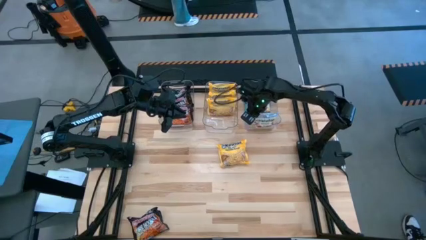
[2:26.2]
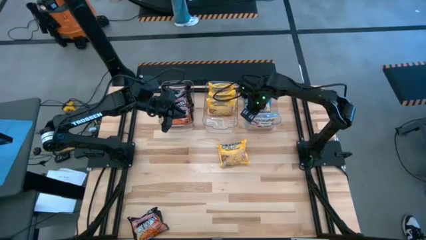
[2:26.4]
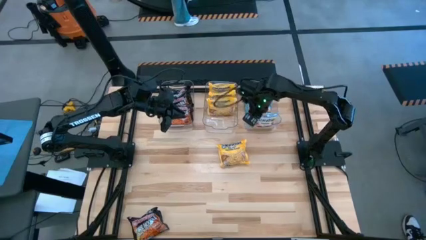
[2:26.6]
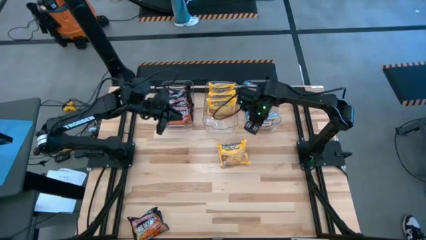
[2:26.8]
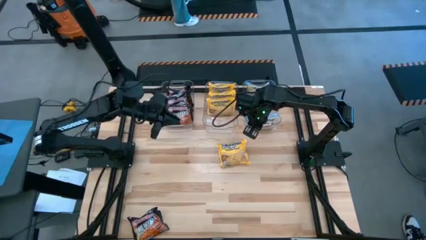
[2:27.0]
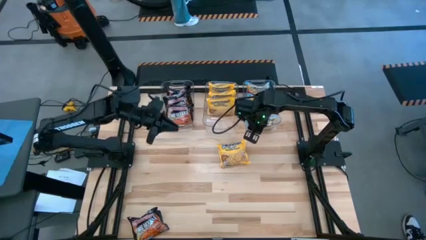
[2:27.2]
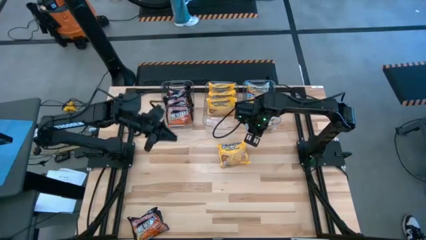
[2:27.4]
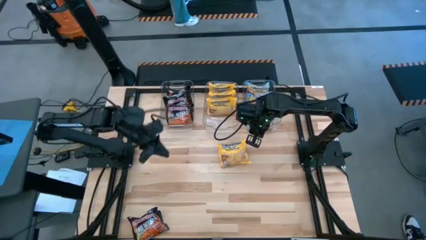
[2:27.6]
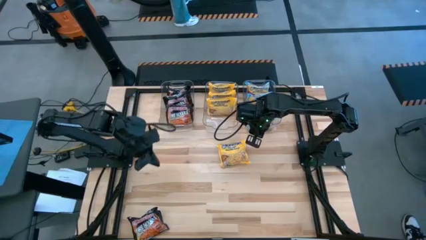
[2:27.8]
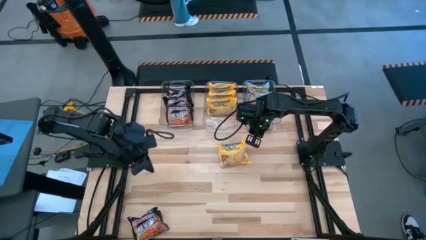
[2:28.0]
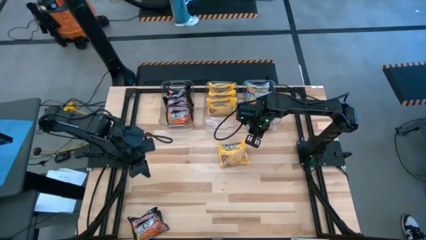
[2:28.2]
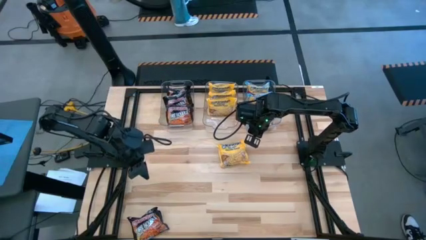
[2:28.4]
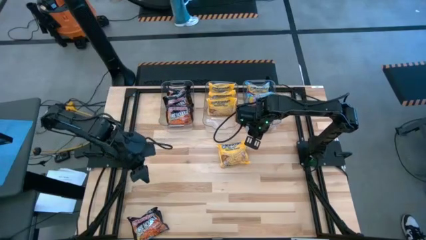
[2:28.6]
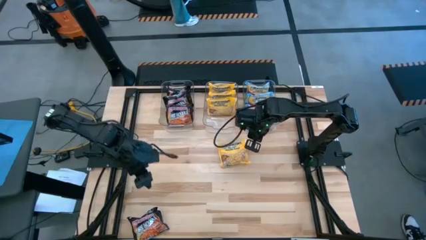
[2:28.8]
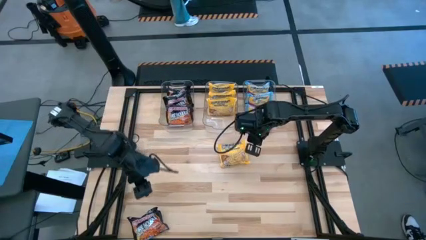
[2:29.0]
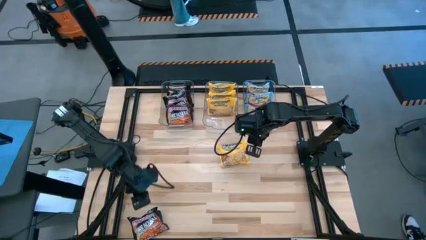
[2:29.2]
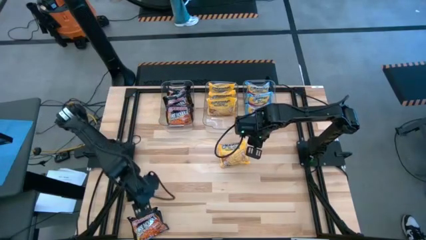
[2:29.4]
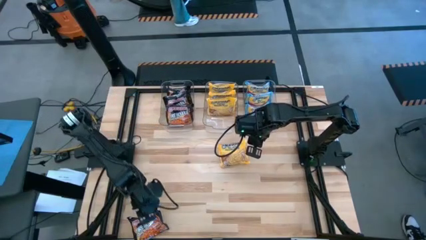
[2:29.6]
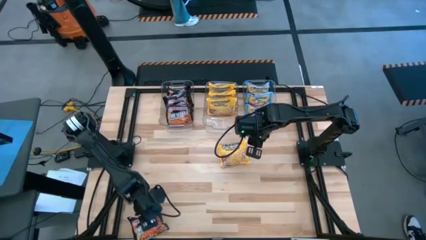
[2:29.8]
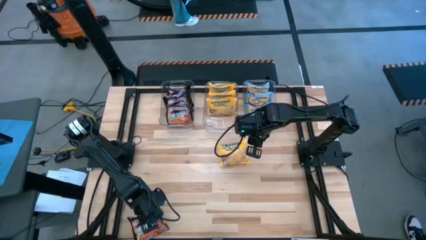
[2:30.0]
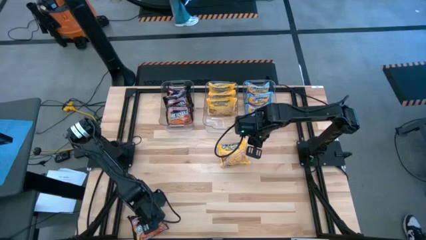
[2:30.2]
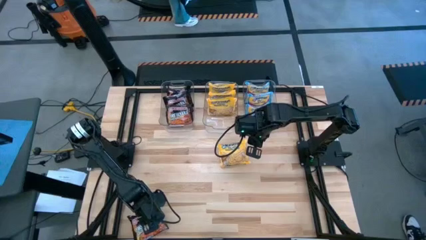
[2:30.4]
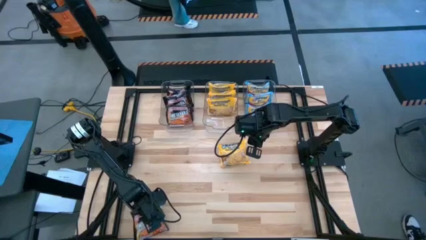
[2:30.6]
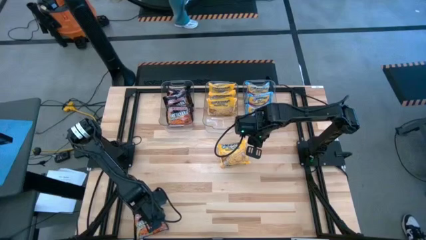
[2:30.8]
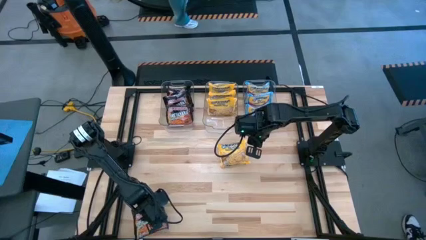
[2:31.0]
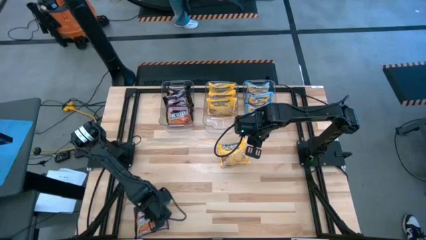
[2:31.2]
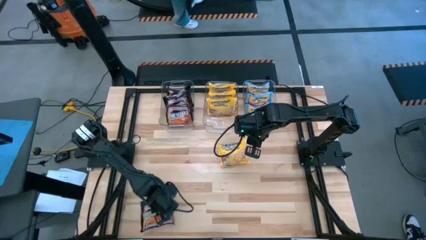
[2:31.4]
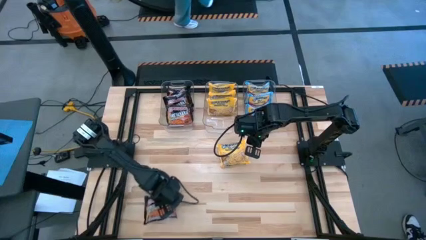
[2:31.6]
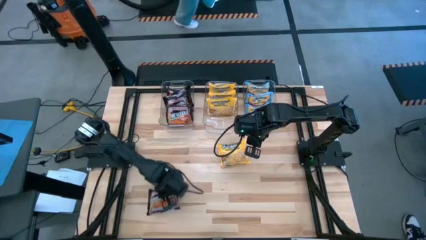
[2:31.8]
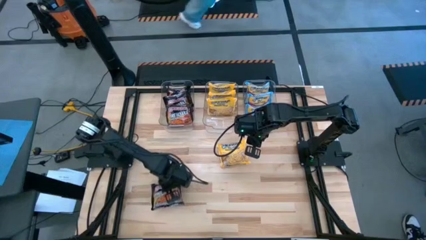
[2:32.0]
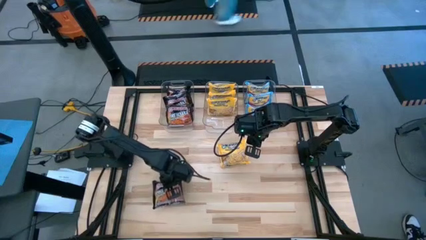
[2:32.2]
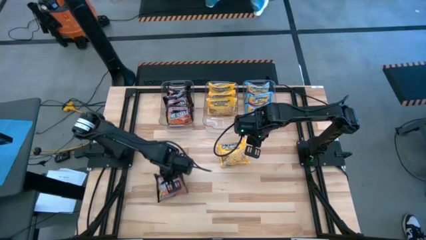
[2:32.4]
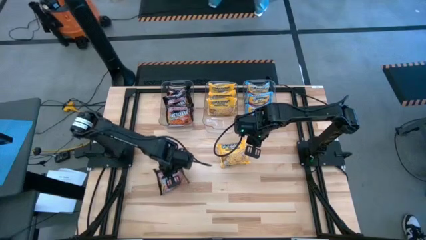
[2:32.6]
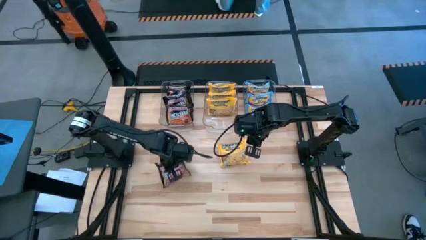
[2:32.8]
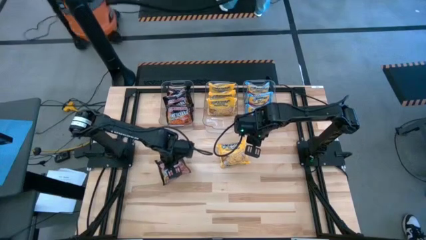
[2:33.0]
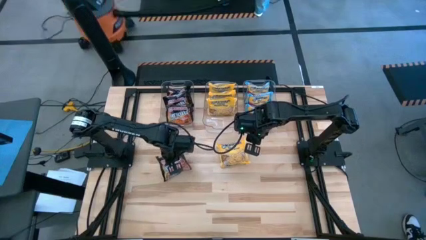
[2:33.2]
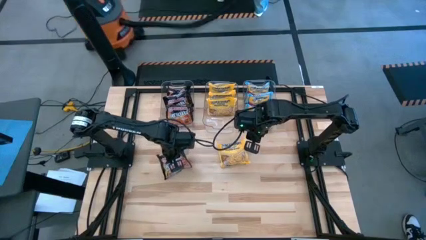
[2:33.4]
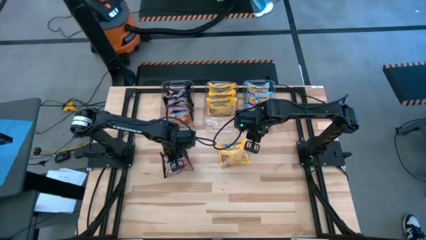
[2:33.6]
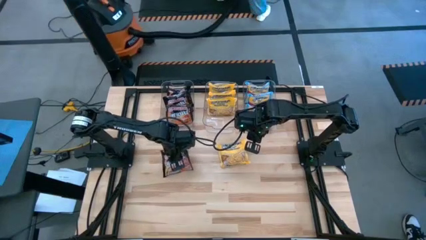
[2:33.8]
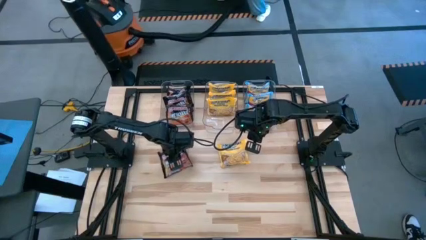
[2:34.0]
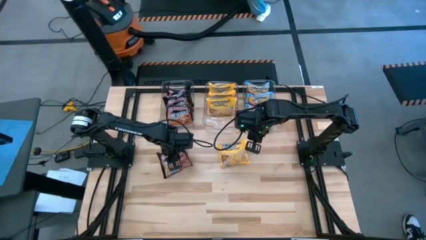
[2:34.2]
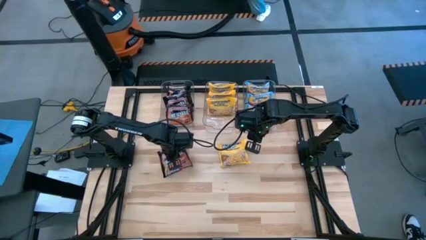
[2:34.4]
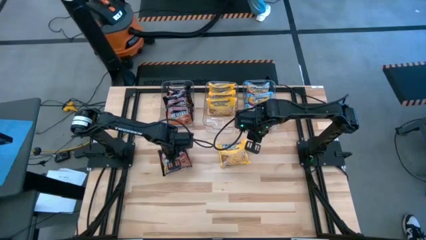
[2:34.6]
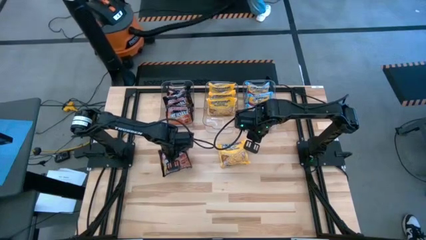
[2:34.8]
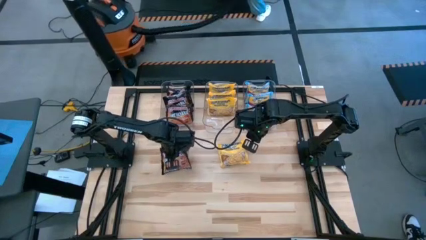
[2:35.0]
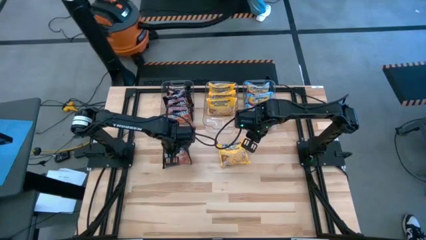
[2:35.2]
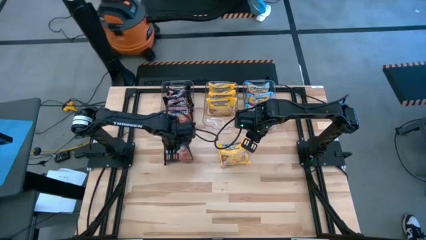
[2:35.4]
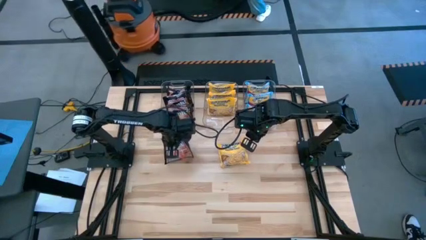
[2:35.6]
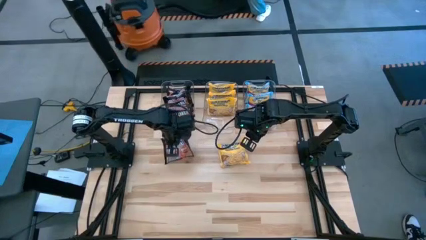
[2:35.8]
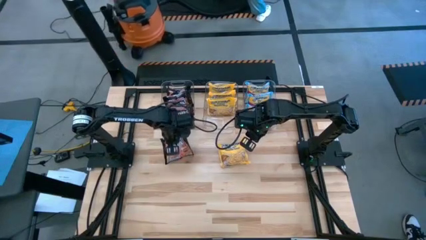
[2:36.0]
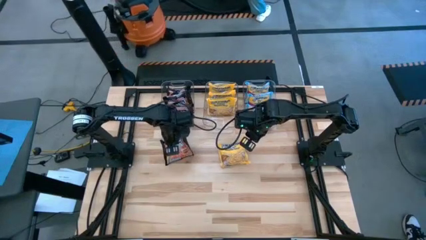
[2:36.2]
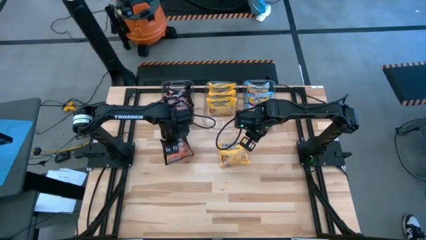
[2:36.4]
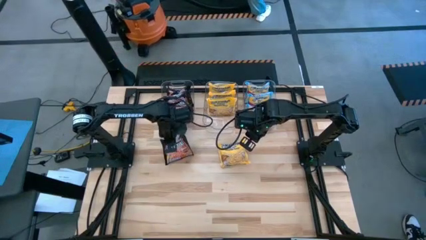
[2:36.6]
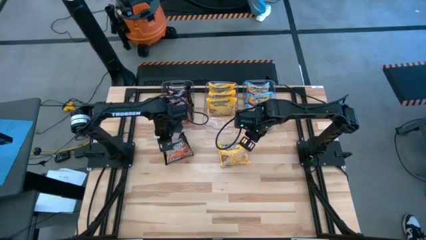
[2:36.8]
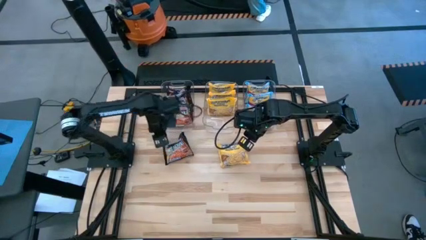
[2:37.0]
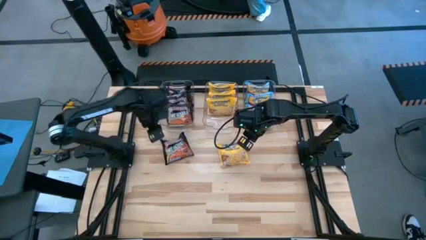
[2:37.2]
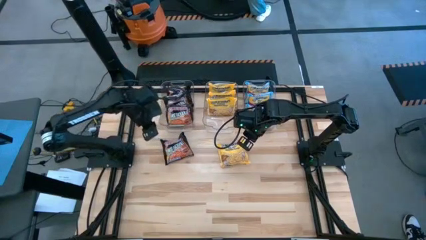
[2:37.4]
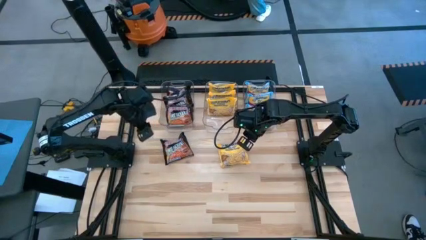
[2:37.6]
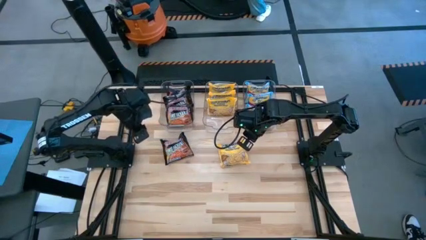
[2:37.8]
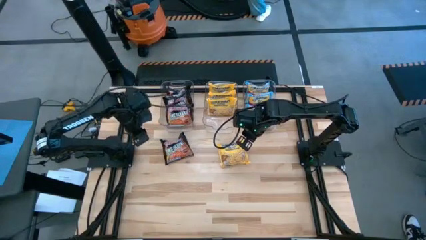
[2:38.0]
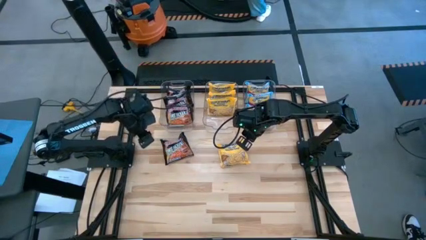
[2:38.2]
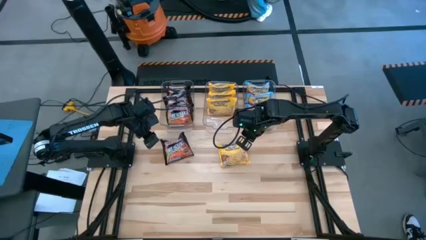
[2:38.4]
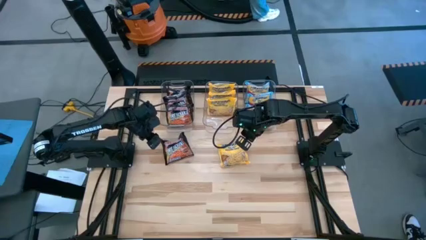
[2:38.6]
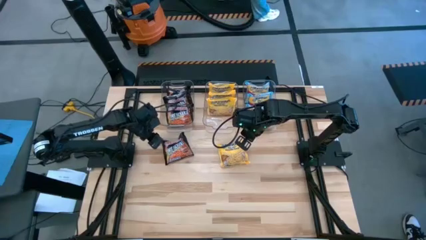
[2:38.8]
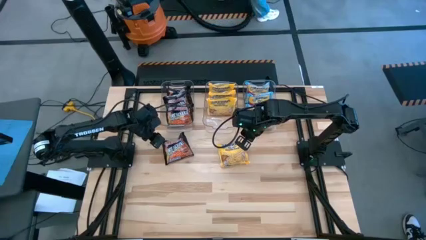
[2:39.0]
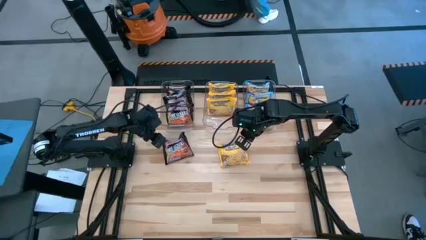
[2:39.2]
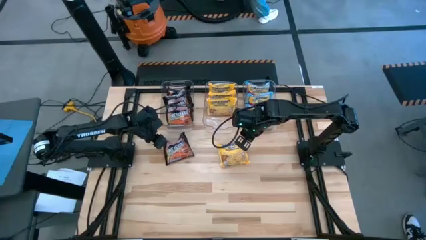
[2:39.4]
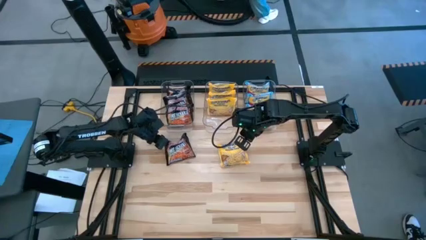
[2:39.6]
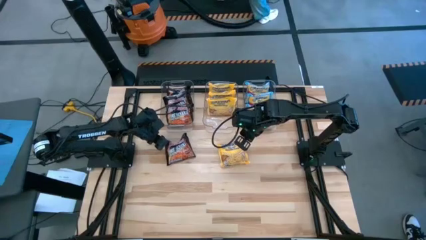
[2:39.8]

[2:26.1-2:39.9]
Task: Sort Maruchan noodles
Put the black noodle pack into the left transparent bin

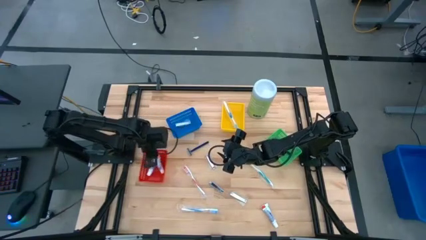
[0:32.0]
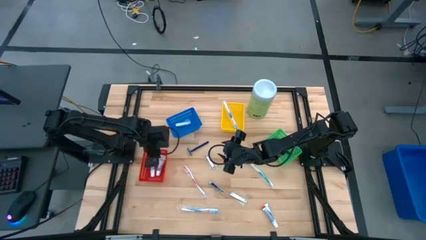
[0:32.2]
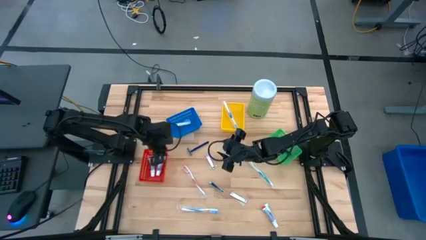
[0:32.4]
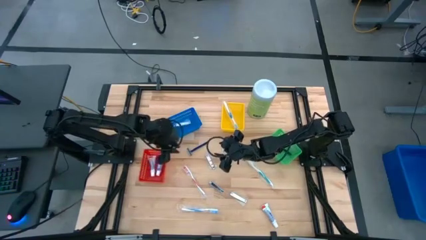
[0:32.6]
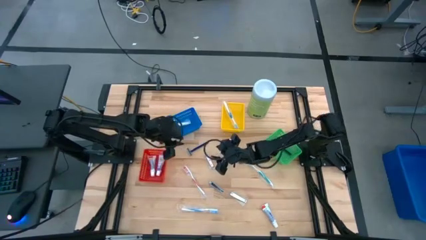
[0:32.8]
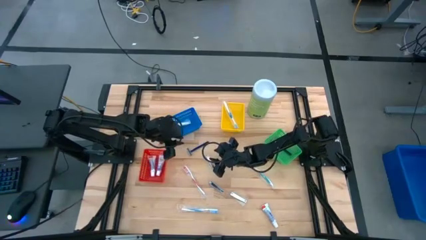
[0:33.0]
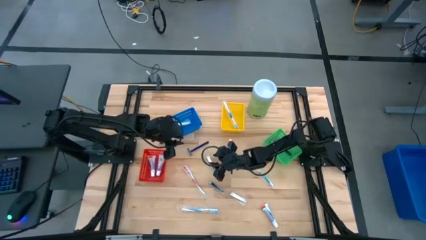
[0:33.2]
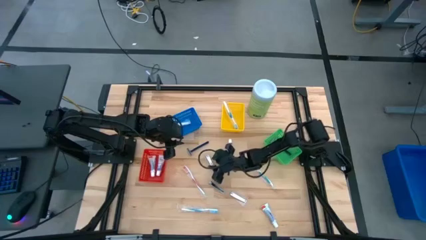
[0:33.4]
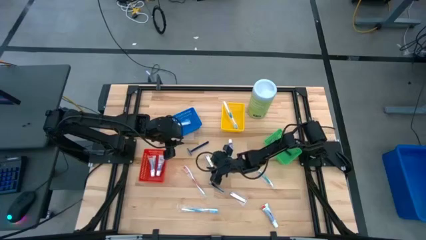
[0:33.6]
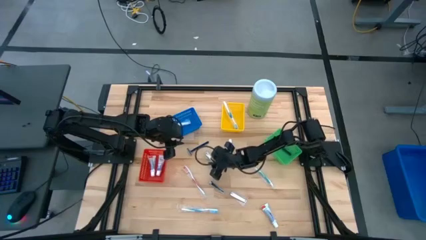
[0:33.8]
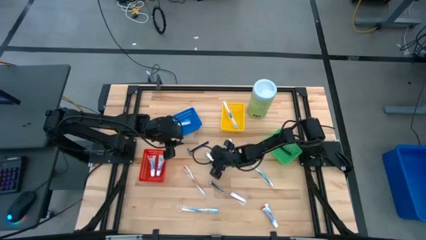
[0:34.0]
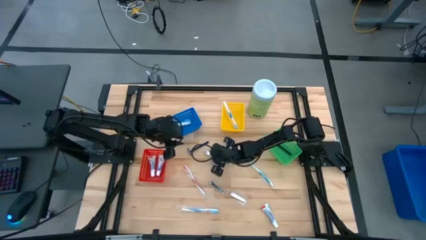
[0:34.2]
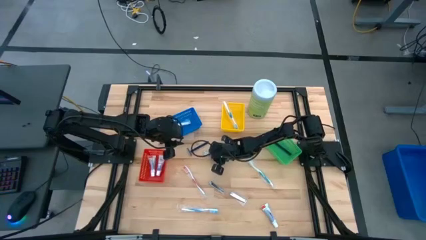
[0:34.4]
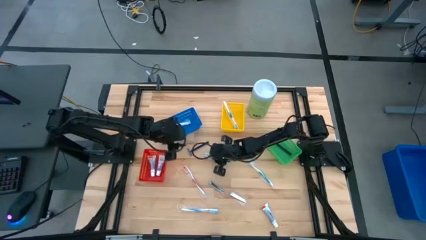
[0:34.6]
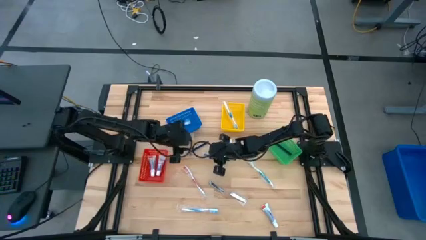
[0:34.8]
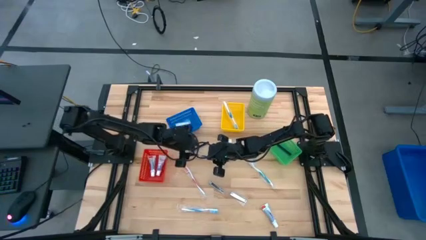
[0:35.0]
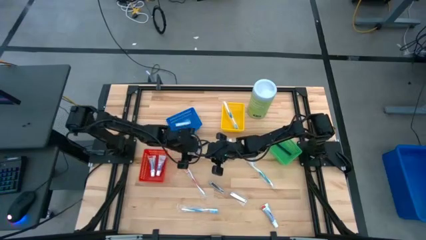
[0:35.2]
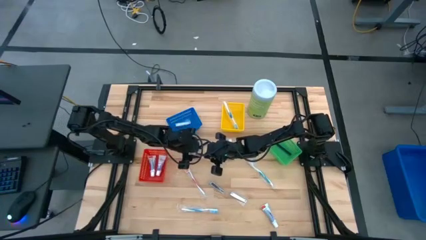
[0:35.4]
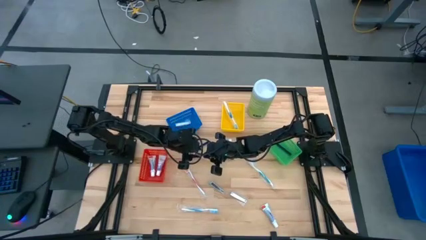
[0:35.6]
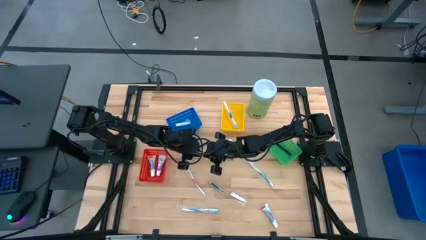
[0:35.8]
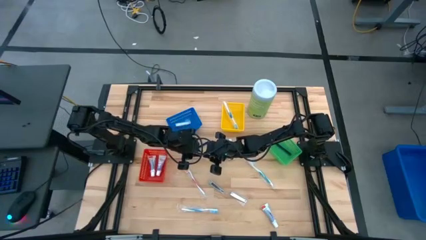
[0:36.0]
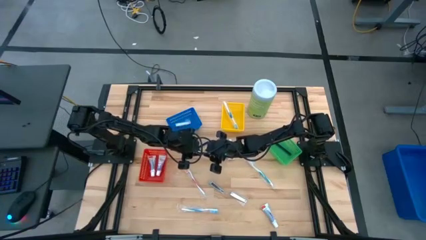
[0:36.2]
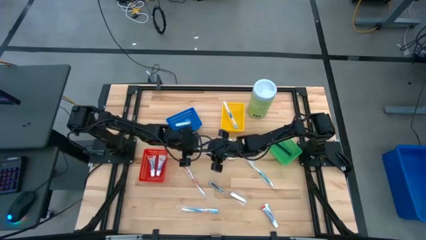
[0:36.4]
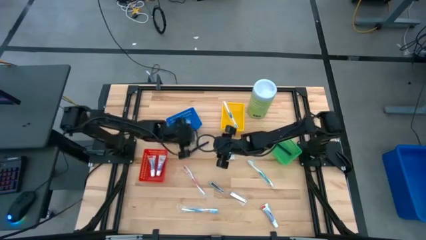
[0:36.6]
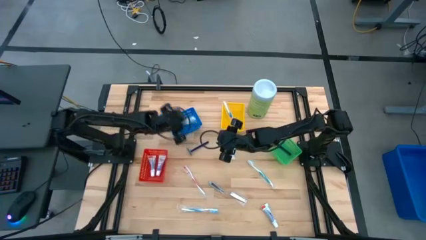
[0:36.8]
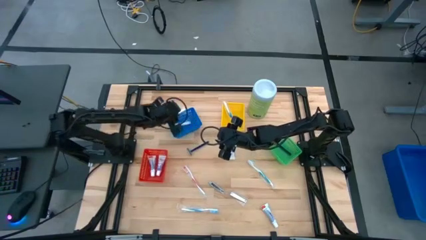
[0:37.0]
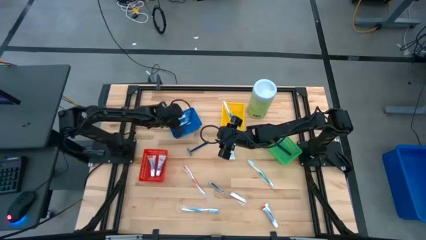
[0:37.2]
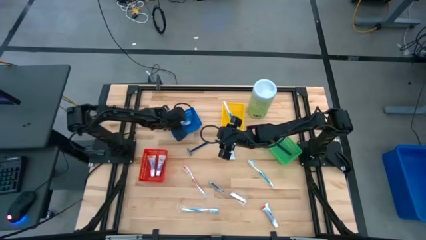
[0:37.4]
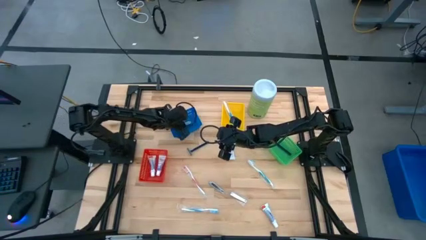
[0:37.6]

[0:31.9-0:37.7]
Task: Pick & Place Travel size toiletries
Put the silver nail cutter into the blue basket
